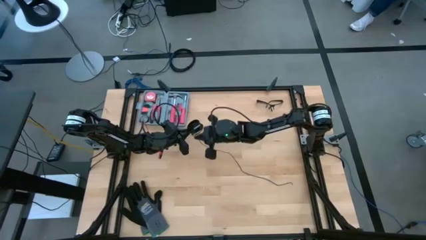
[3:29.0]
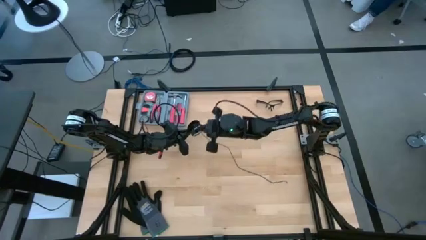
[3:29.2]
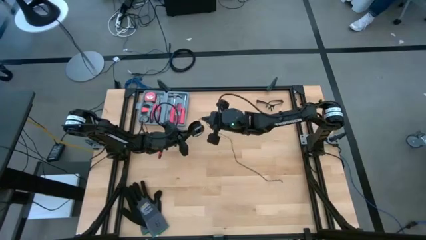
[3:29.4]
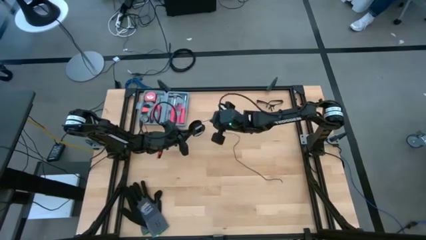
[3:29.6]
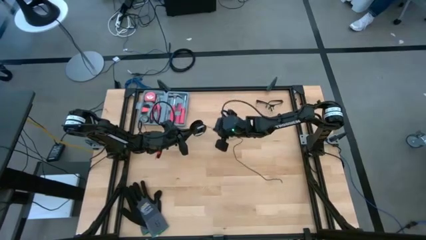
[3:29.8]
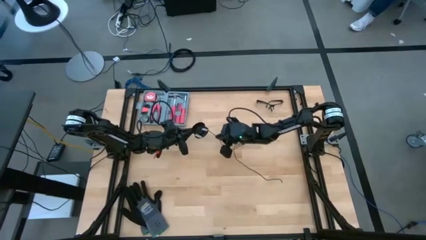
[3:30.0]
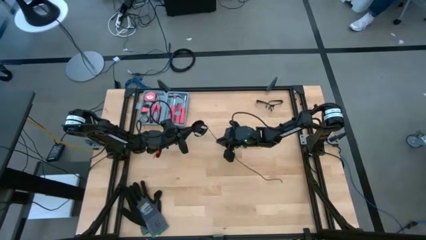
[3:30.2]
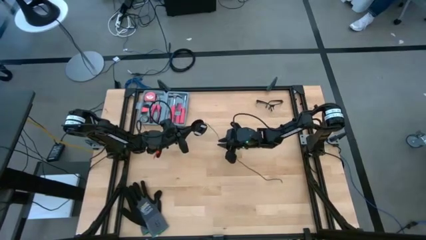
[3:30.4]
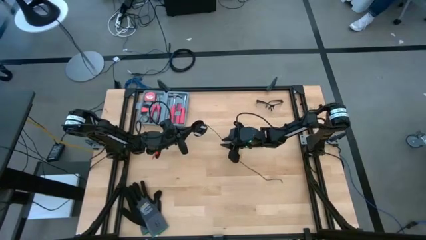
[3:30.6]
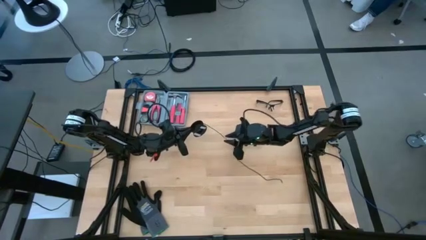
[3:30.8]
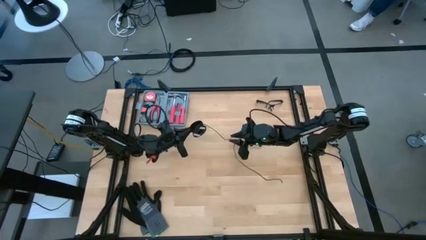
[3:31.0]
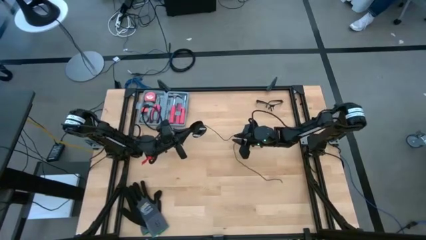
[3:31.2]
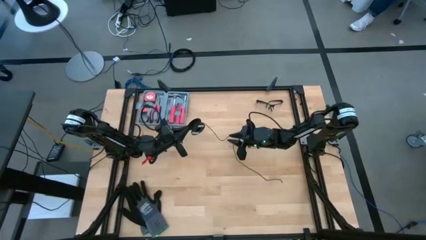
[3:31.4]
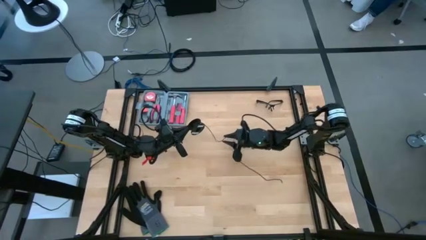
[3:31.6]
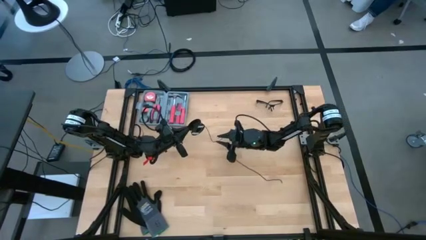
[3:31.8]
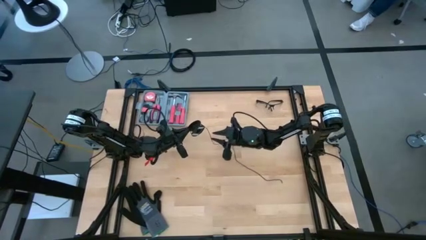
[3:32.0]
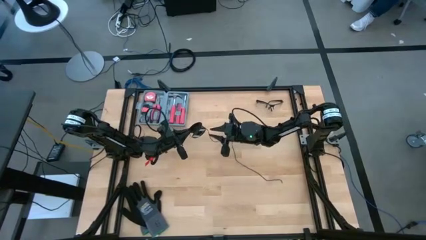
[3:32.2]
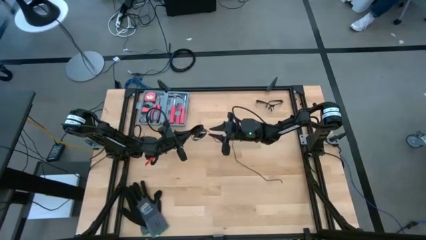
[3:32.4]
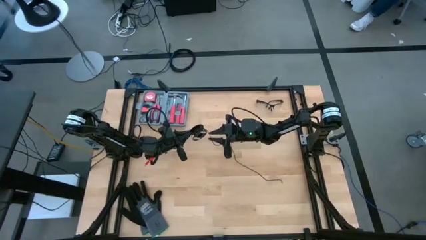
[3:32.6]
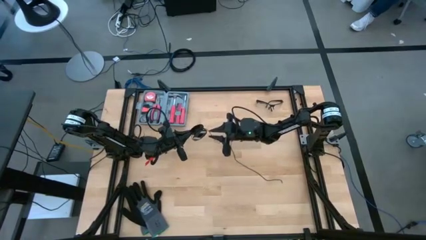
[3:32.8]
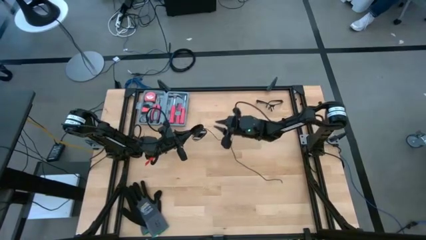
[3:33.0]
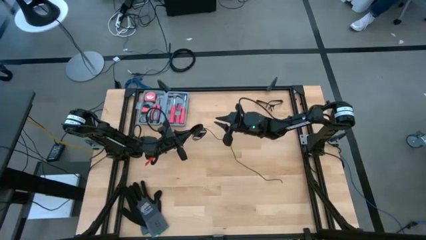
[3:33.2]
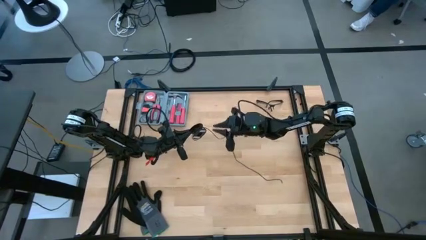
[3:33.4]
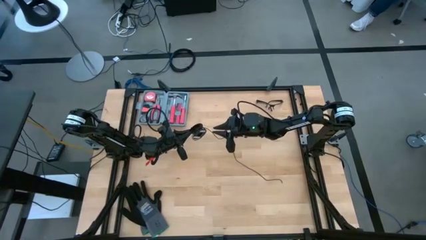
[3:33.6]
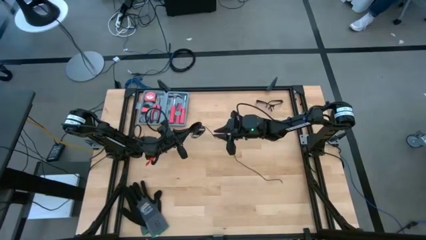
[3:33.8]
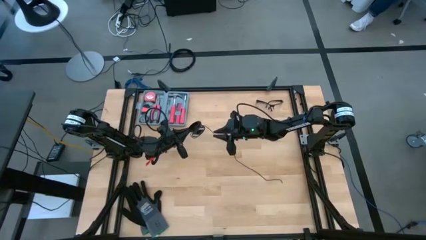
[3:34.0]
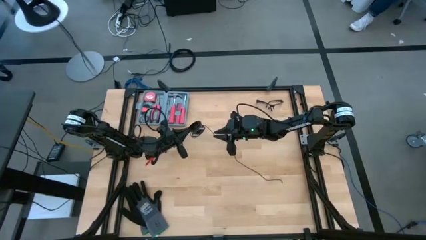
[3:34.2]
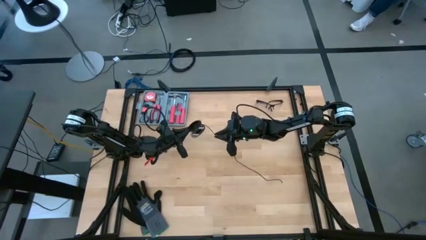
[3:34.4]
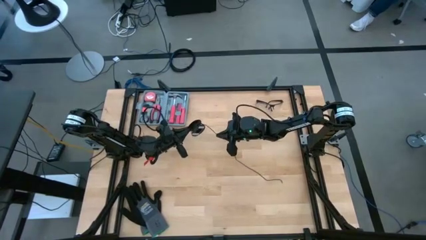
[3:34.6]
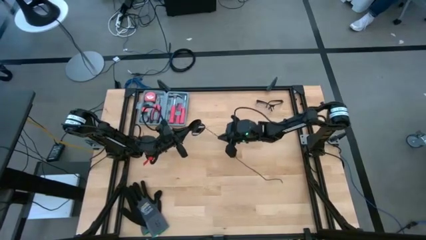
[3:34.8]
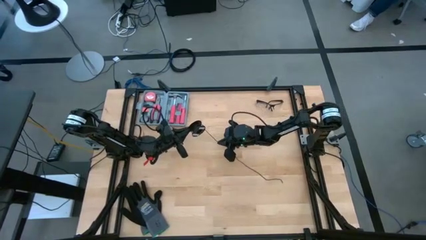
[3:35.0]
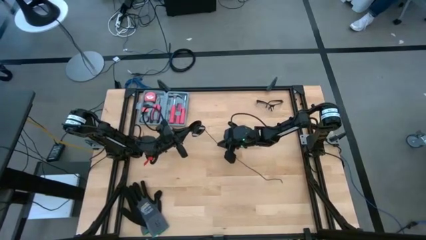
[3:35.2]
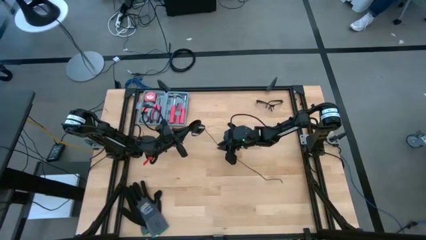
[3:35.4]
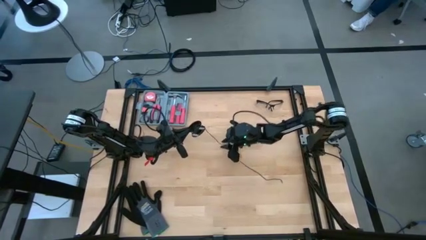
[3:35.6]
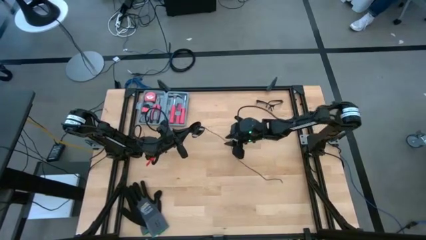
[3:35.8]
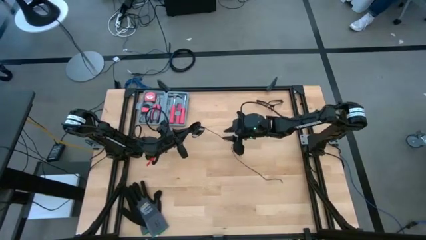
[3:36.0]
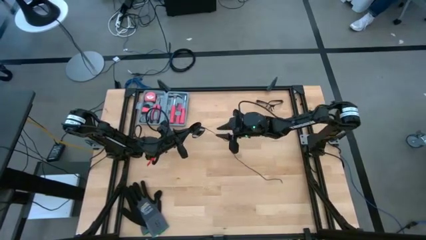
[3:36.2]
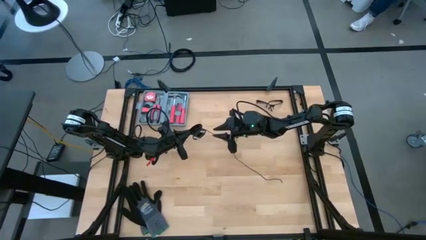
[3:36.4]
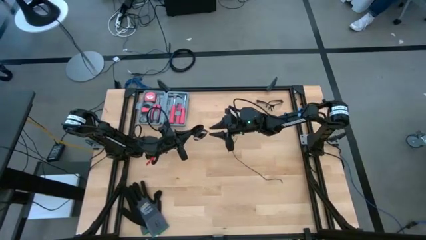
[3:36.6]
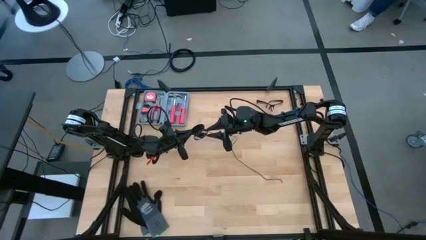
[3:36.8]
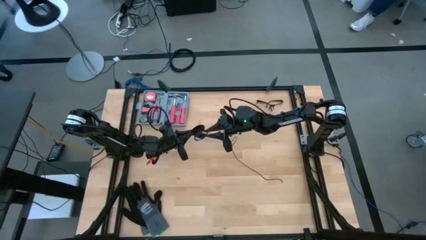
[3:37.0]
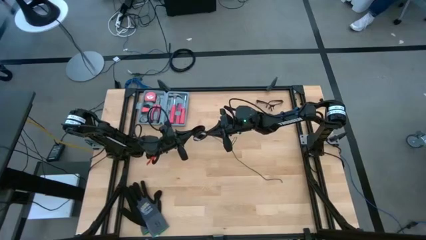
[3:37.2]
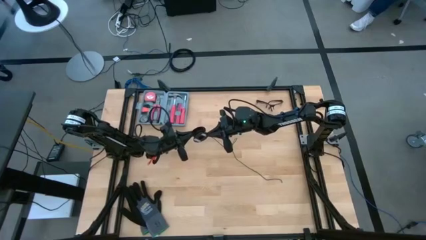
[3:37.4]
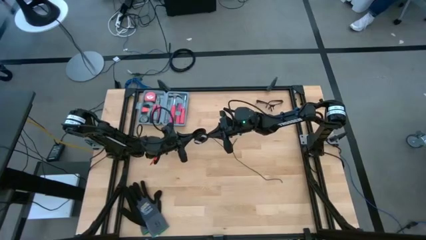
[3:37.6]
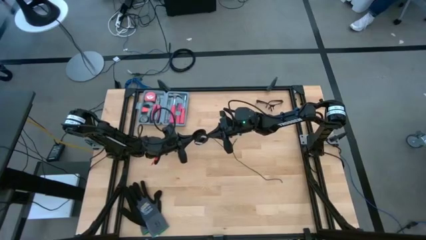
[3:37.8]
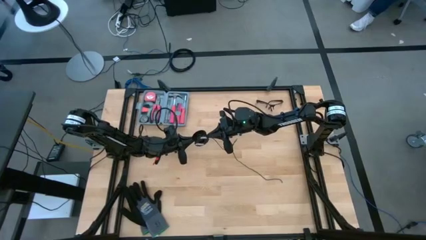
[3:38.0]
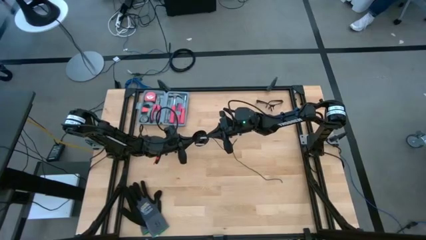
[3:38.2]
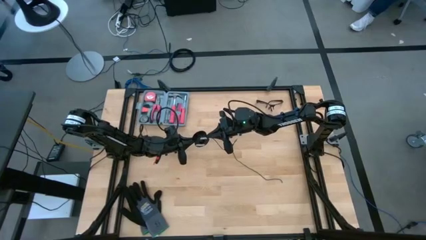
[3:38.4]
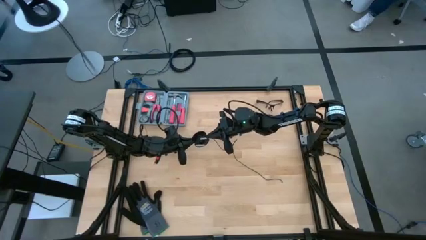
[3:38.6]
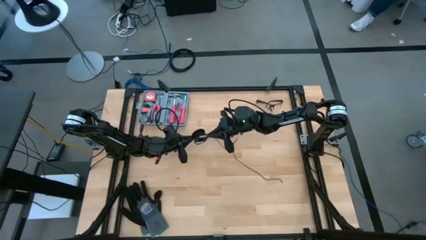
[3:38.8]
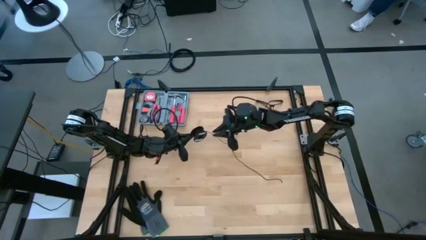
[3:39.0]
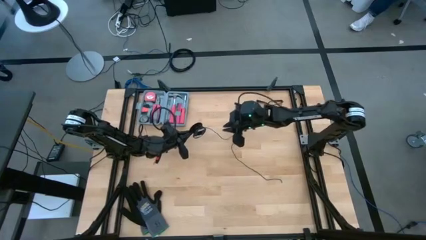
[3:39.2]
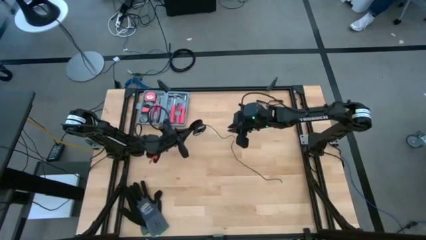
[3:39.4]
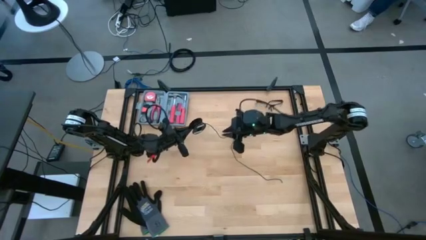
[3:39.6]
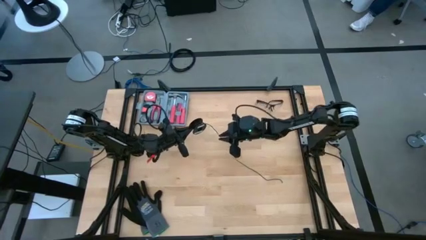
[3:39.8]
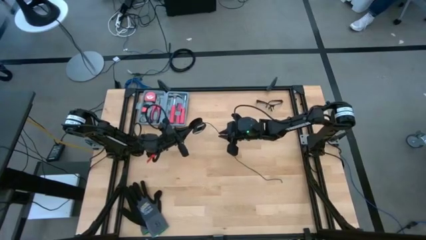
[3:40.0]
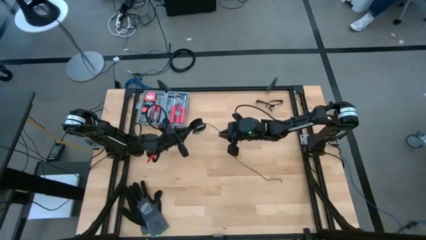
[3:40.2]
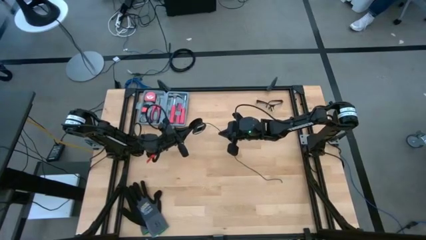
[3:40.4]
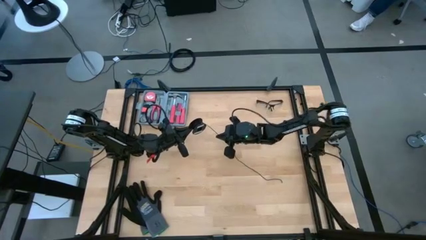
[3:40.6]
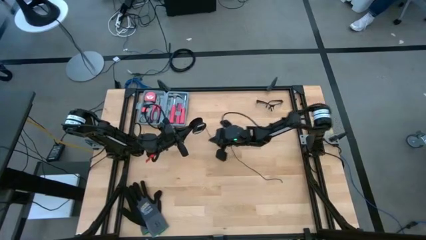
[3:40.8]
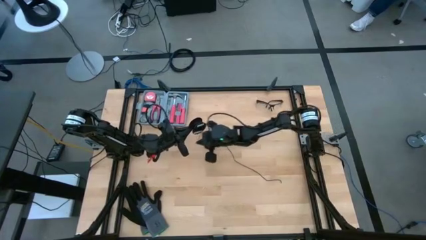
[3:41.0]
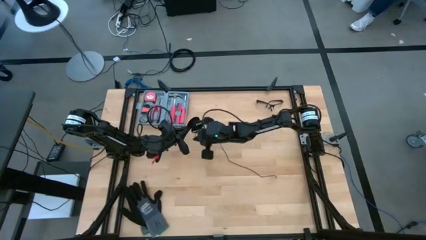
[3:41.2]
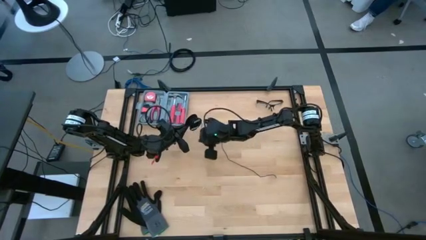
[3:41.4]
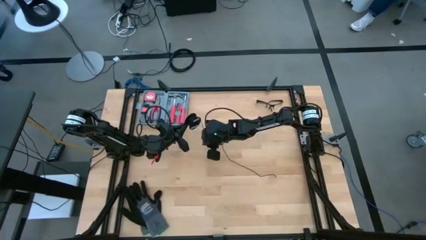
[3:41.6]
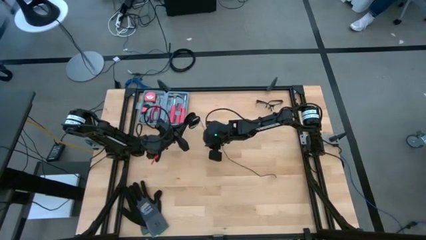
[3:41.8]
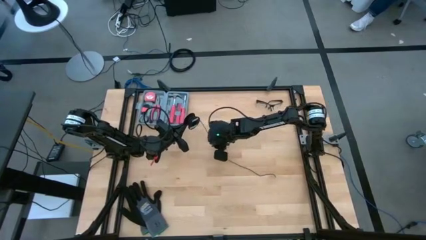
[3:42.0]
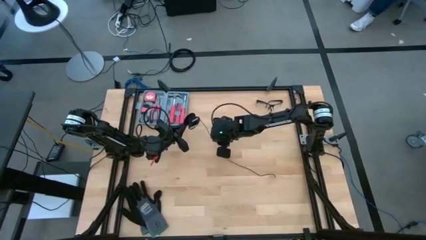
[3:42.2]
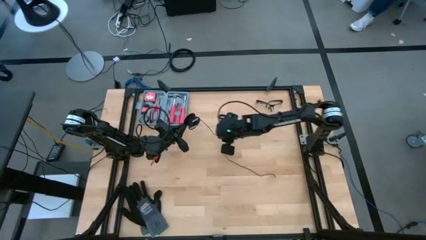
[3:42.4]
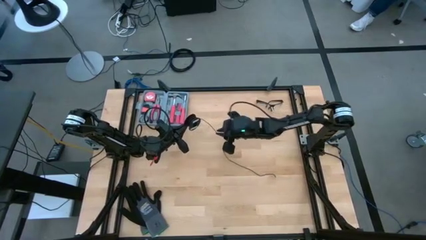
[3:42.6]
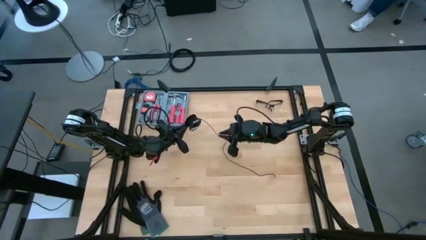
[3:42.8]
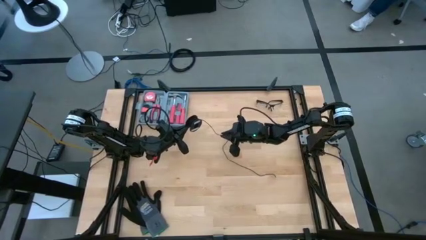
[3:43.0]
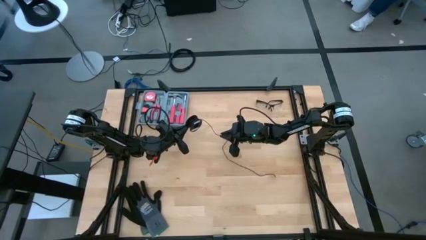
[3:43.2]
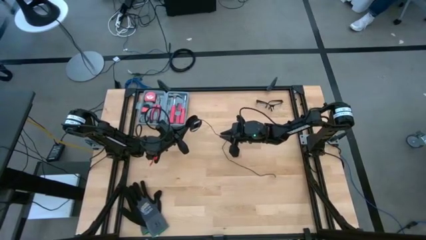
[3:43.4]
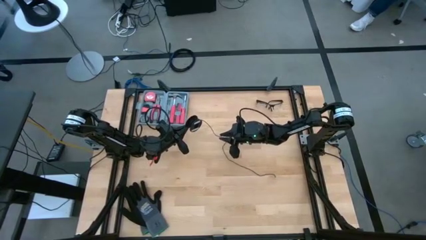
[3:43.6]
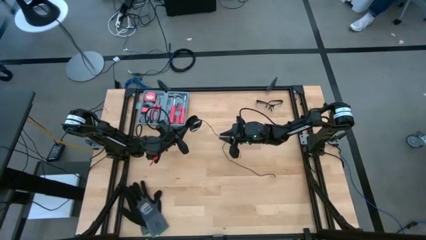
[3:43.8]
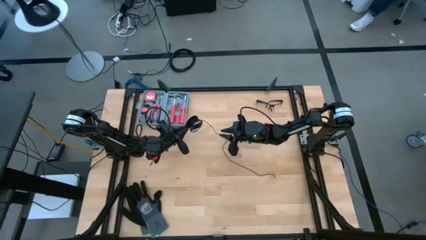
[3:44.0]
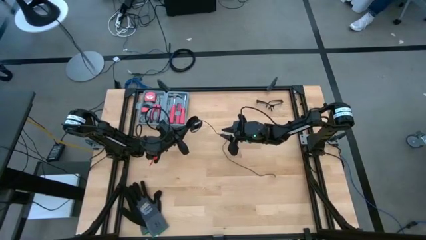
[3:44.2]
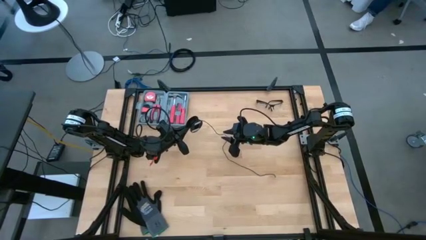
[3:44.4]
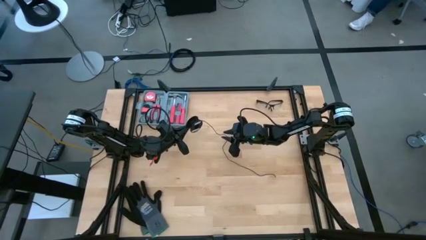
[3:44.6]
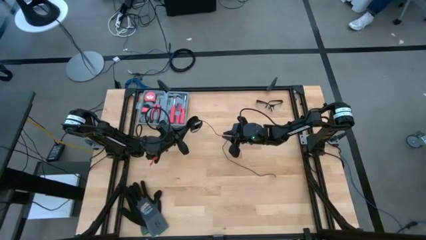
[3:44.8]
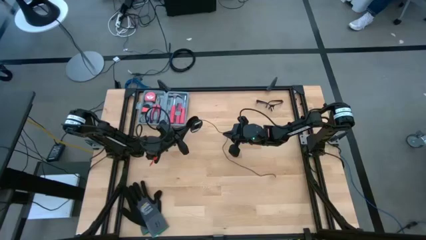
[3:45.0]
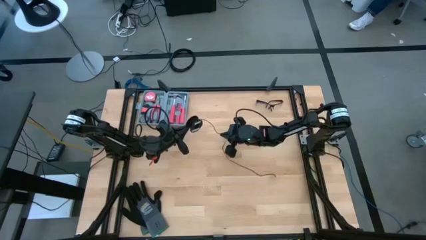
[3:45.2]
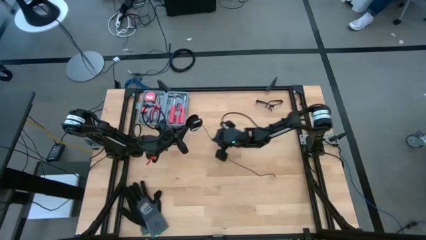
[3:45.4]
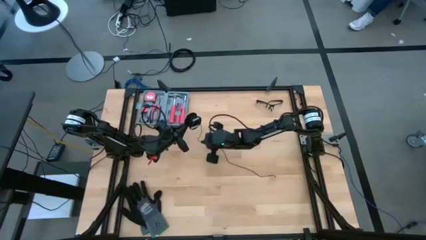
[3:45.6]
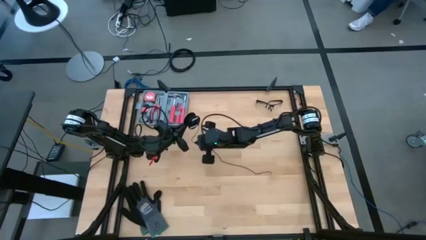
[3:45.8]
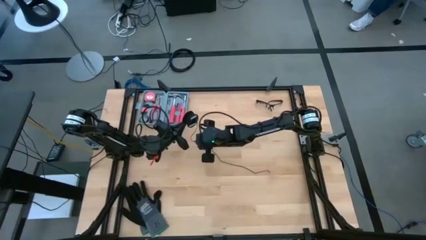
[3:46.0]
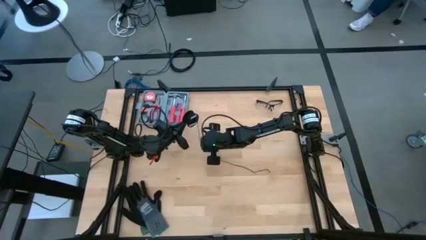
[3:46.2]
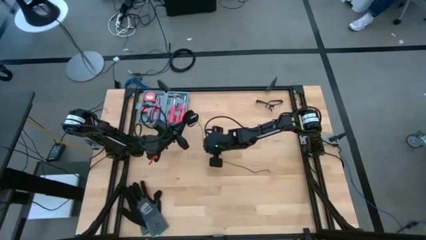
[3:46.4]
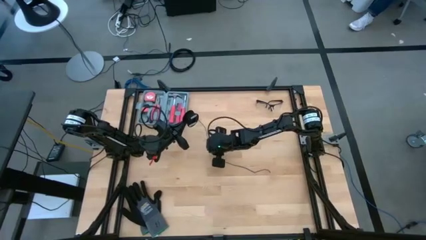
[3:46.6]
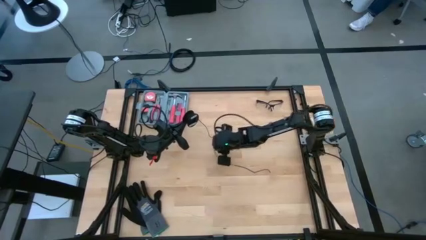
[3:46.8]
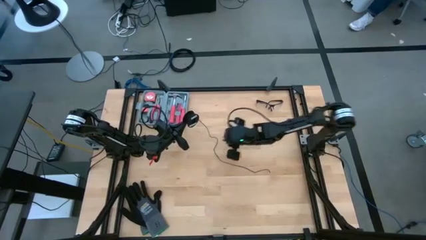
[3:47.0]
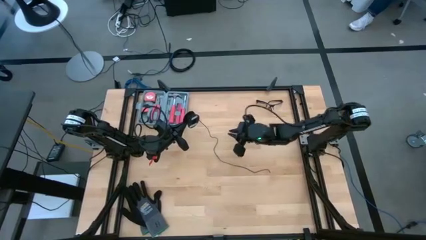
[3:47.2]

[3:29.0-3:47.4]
Task: Coil cords
Coil the black wire on the black spool
